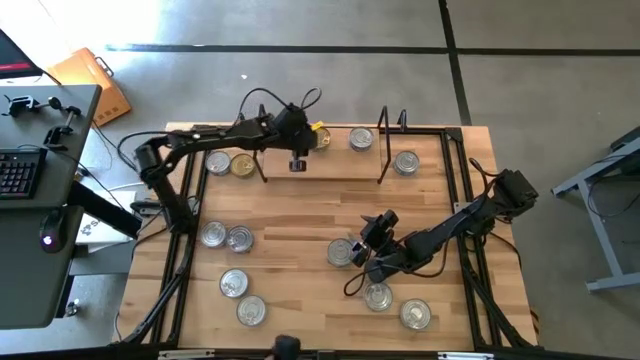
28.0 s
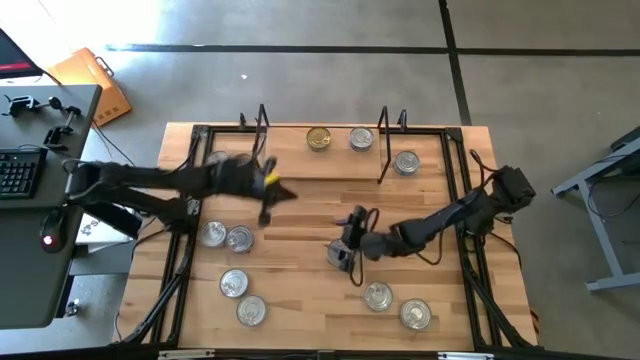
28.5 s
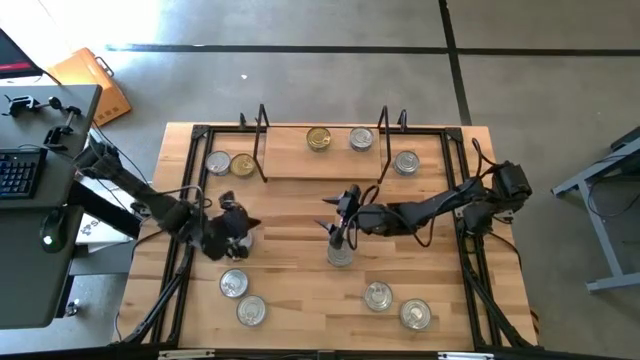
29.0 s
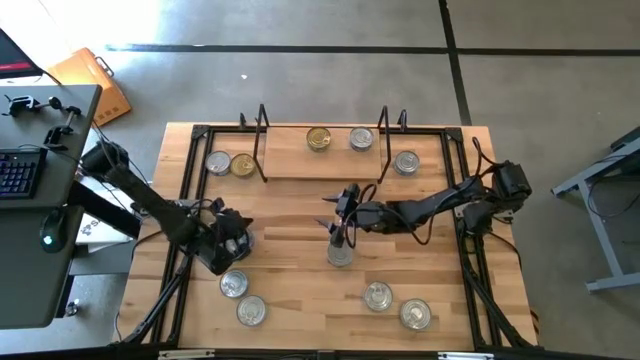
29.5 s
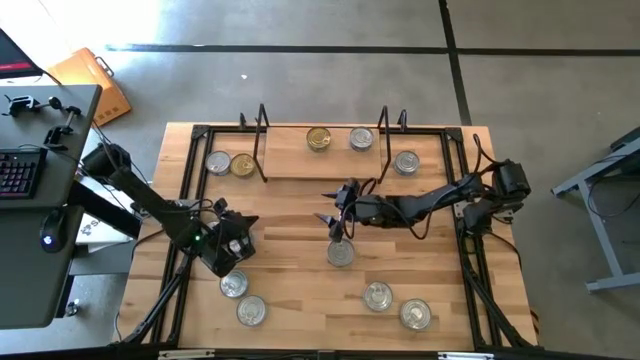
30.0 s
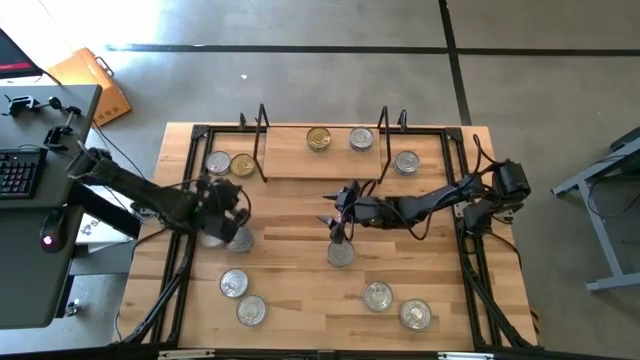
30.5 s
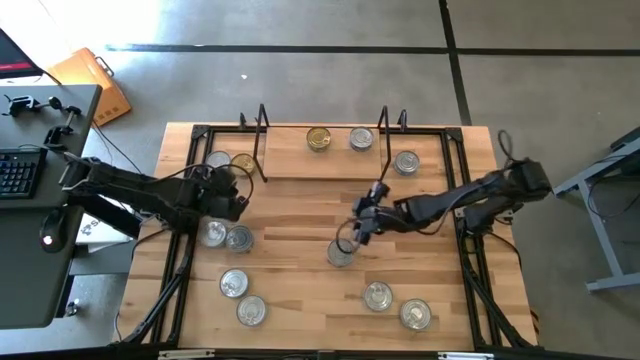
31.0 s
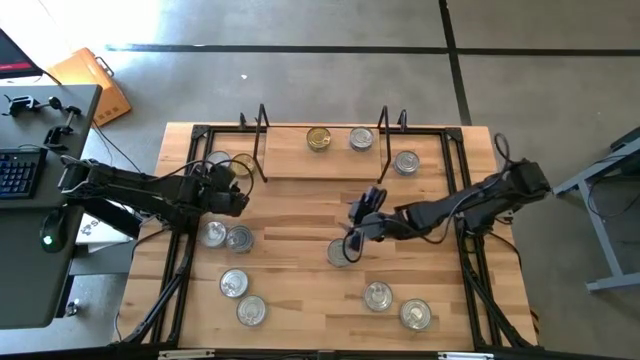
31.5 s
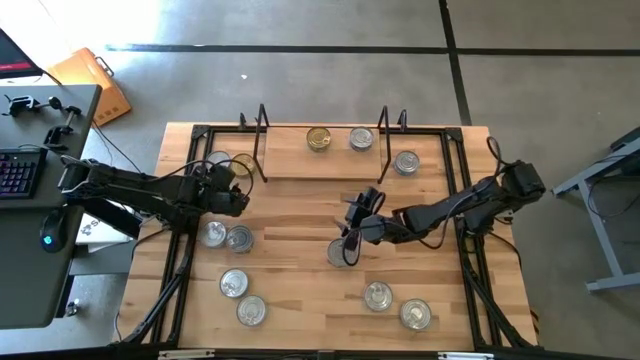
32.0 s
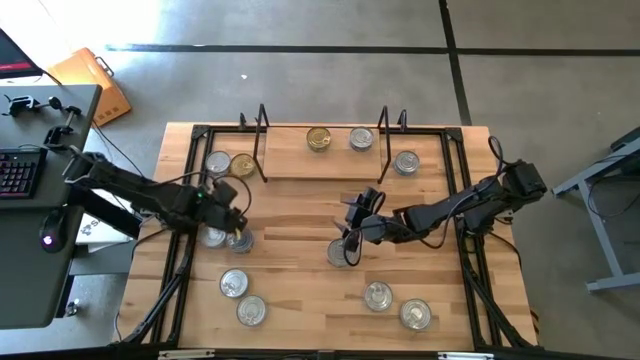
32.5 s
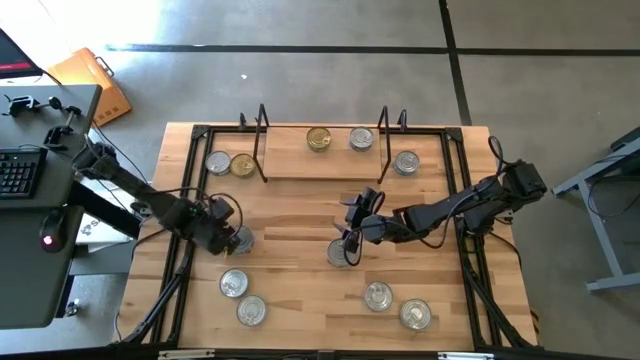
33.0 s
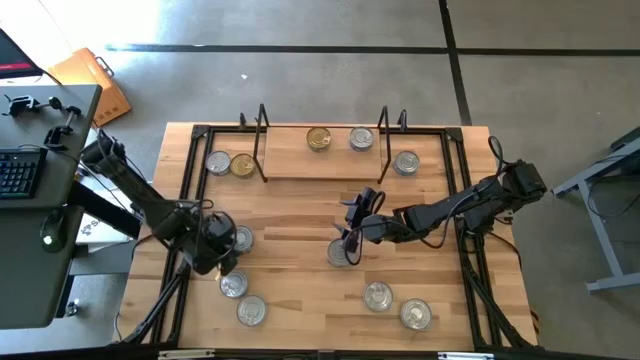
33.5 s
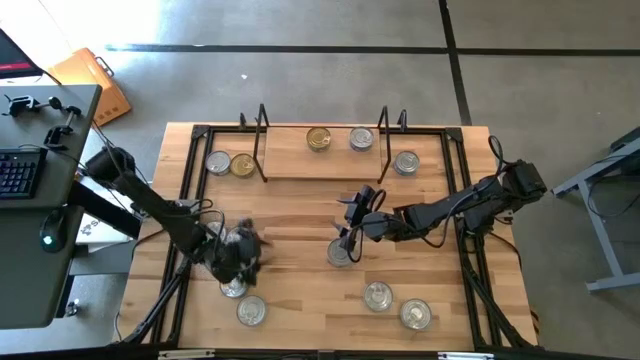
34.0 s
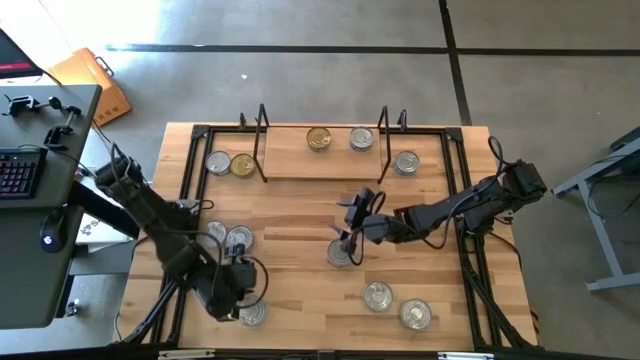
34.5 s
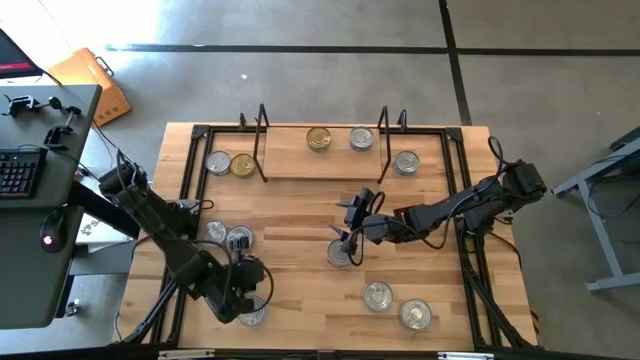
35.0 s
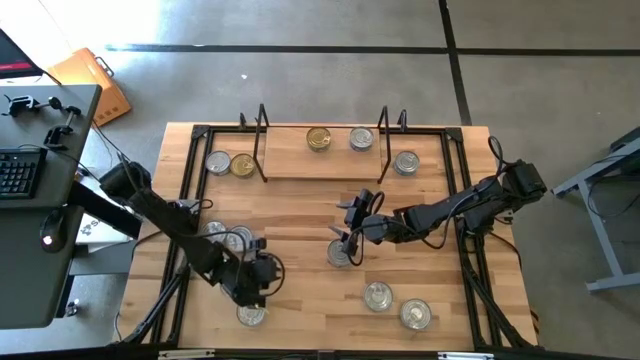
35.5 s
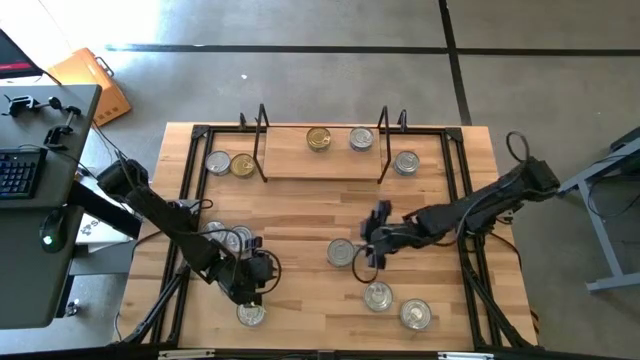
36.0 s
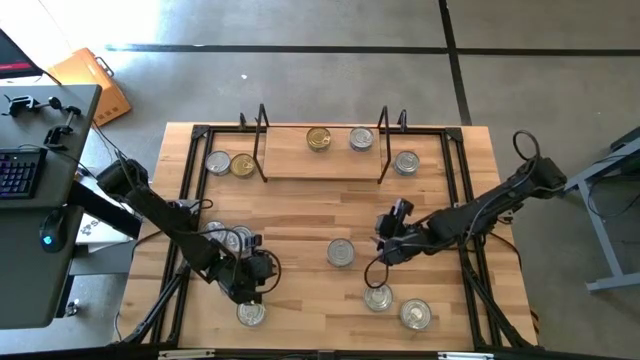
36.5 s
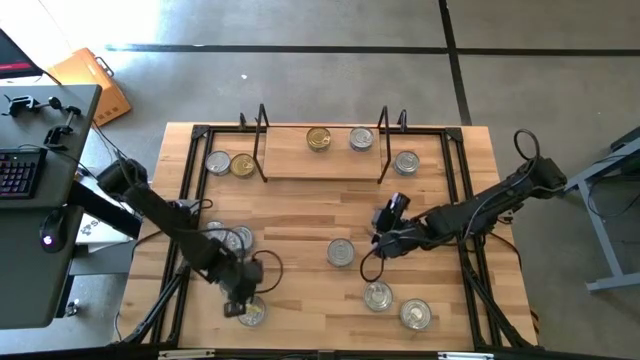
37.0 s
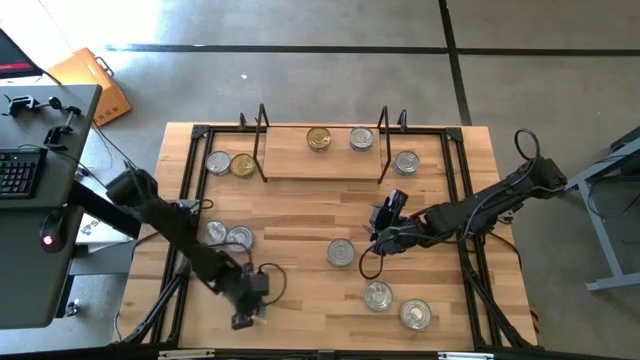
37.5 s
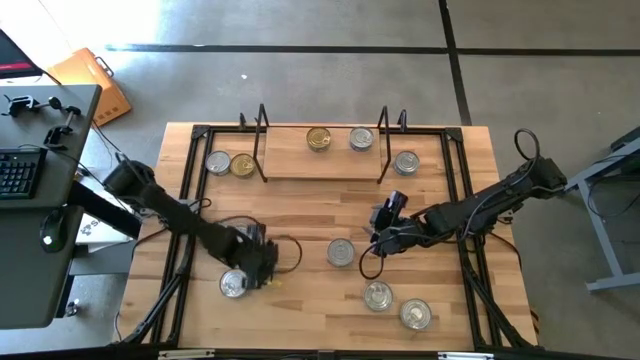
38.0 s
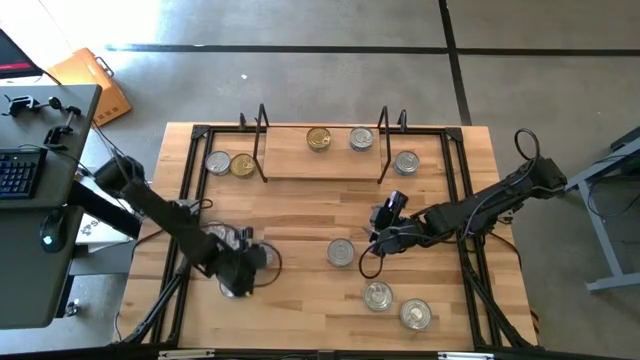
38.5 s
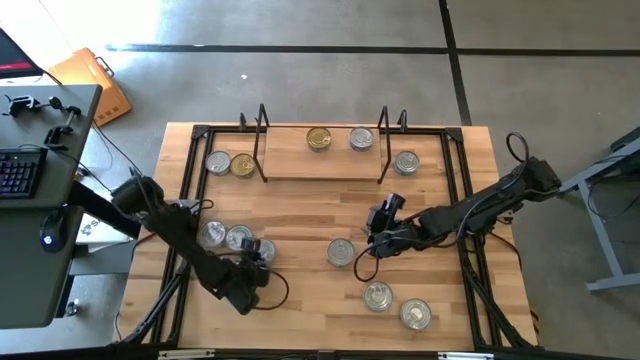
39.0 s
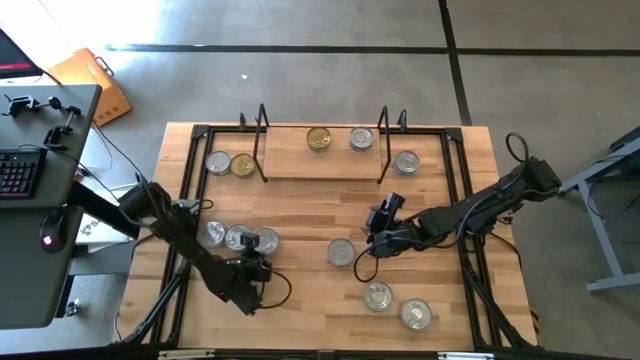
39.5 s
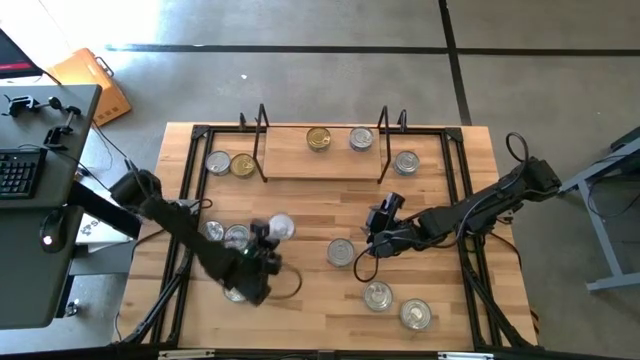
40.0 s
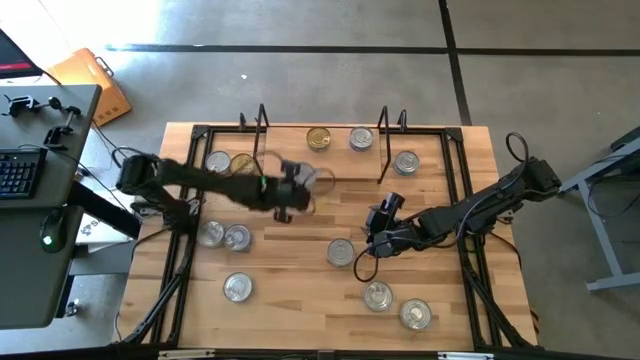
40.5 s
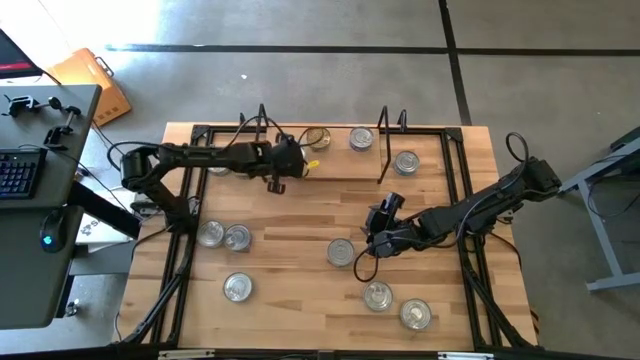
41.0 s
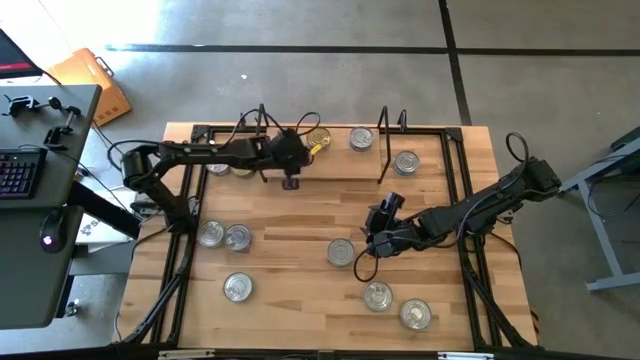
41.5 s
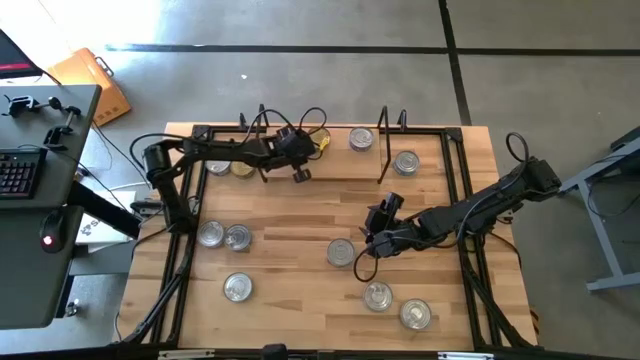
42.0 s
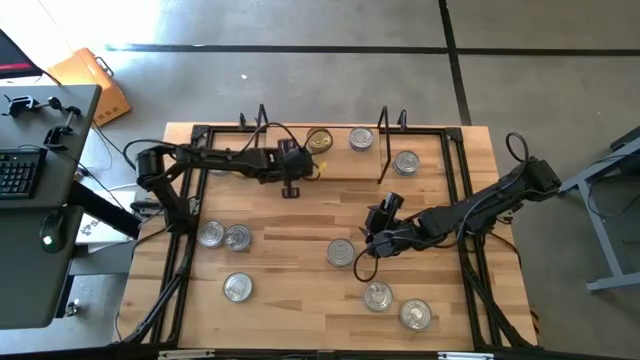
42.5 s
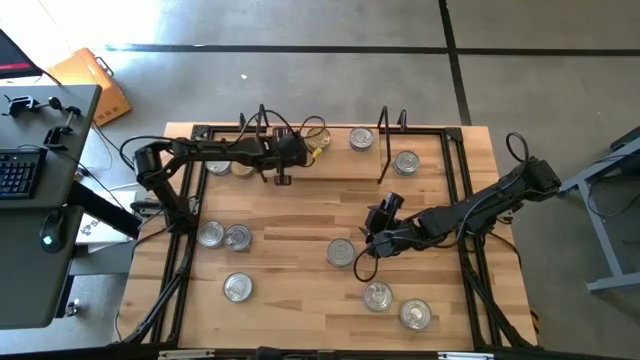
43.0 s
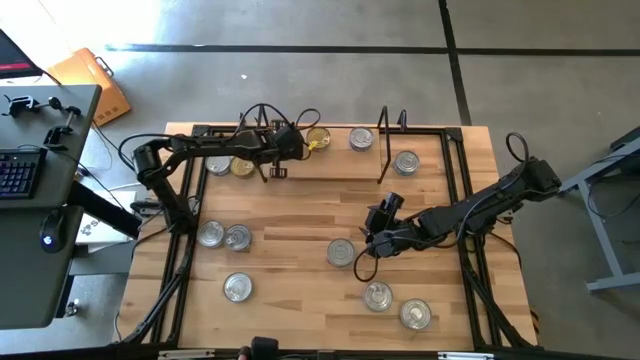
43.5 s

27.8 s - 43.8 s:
Task: Stack canned seafood by type on shelf
Put the yellow-blue tuna can on the shelf

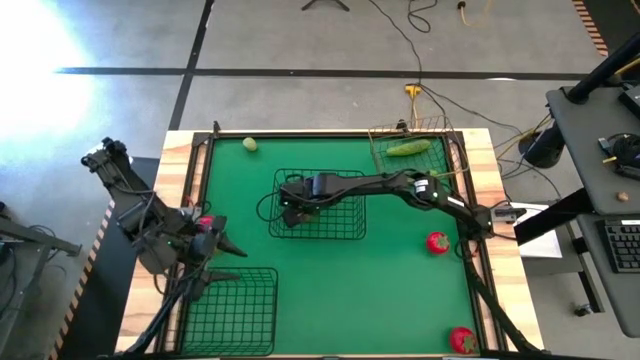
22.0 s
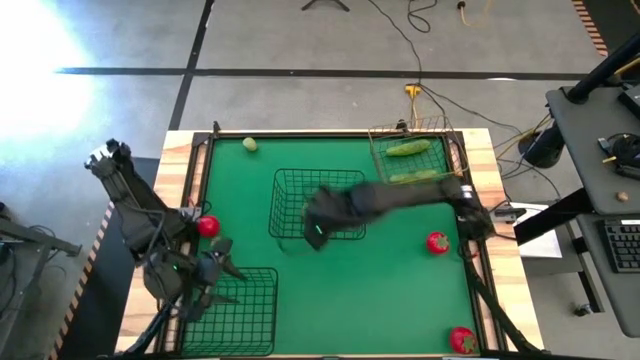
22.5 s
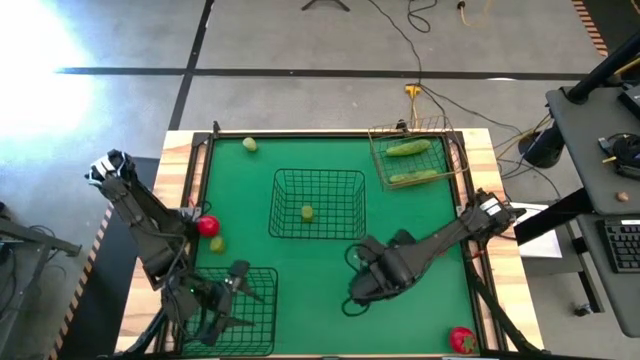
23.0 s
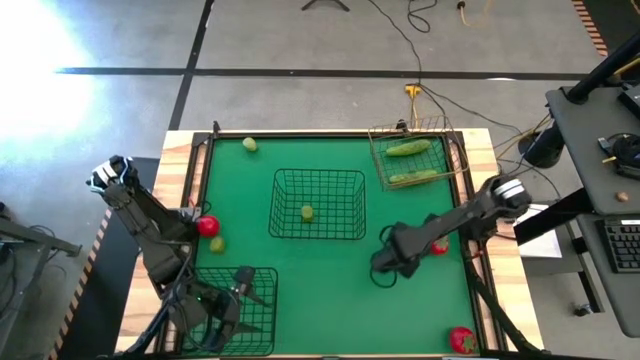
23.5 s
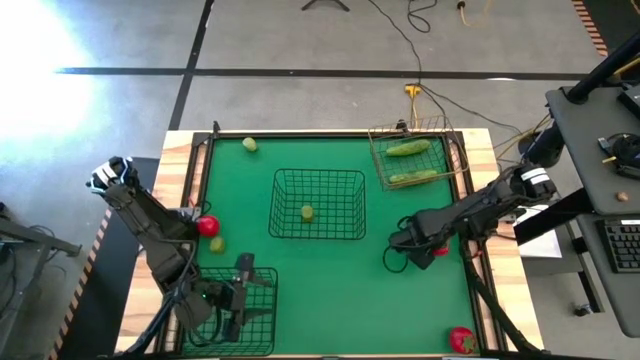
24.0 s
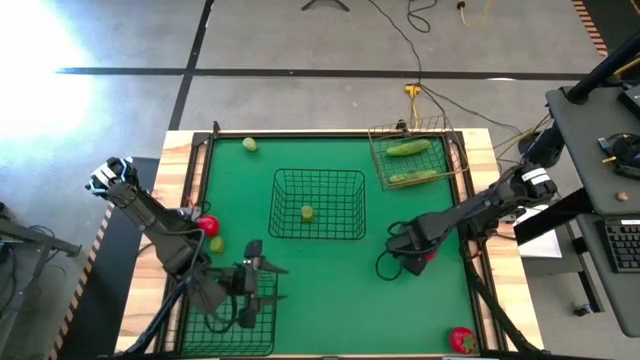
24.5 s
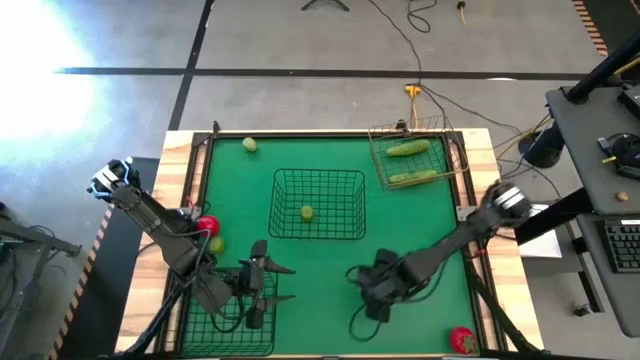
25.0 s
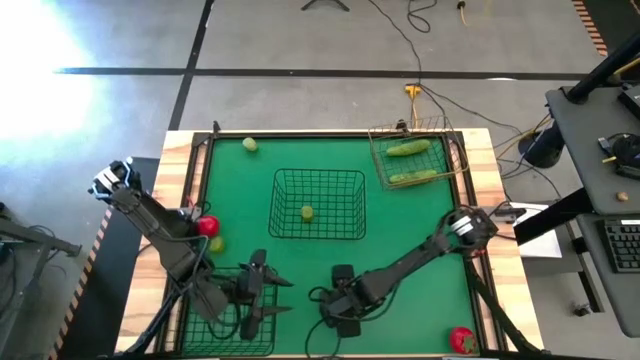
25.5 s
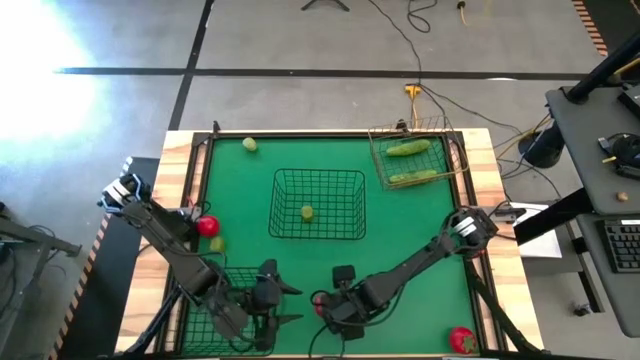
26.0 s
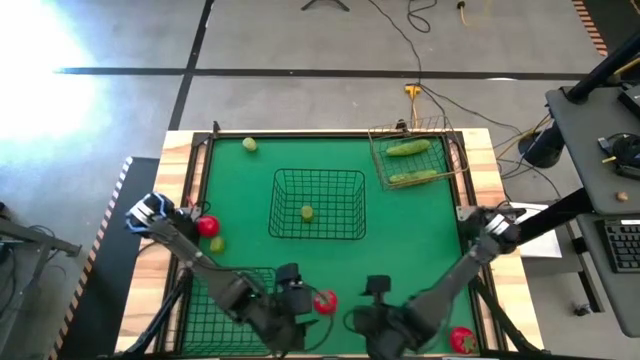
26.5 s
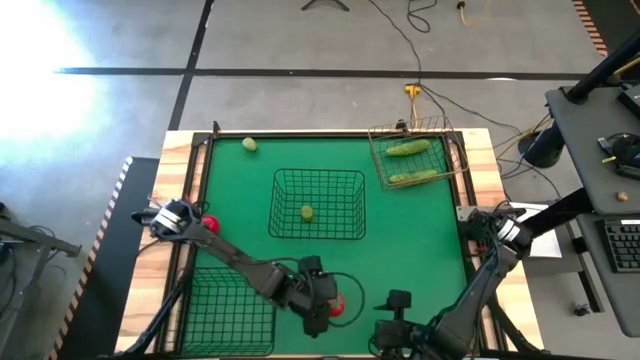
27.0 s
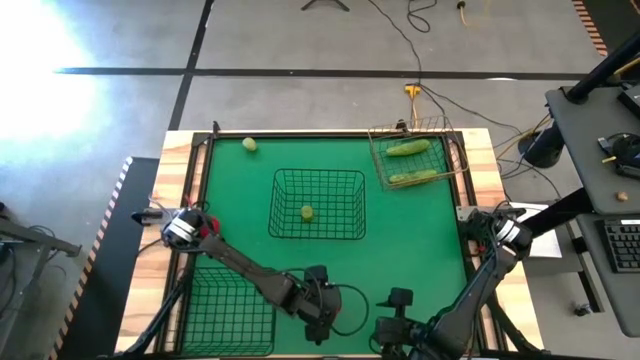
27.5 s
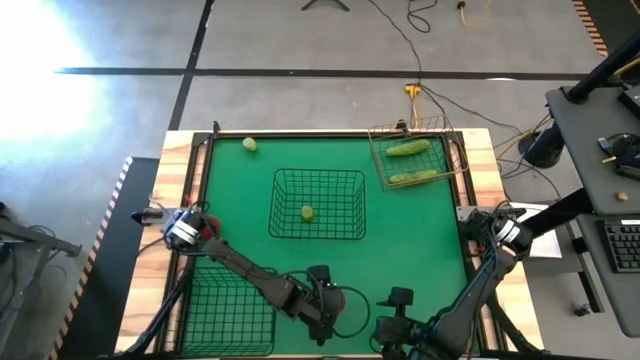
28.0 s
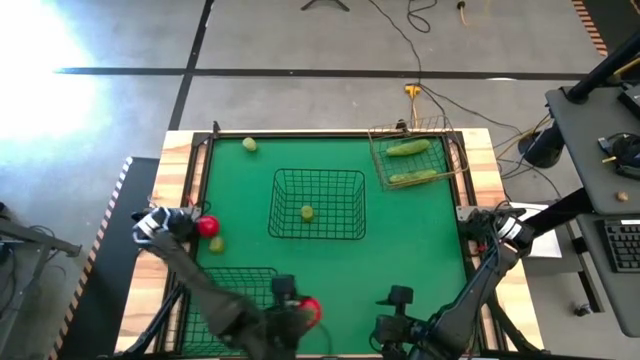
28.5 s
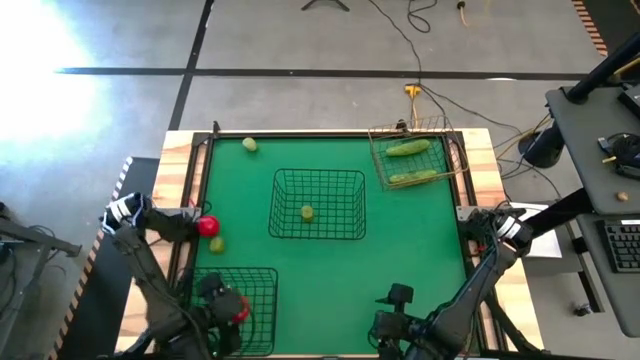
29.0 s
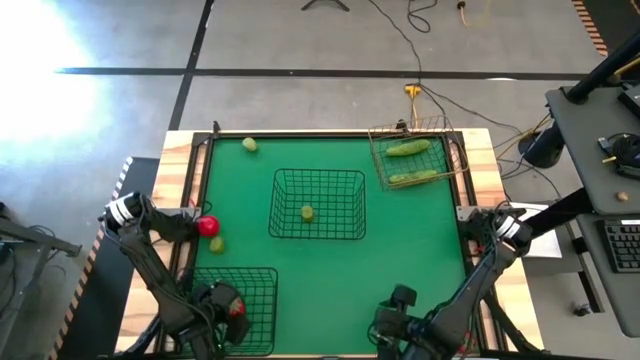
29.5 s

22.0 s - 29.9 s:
Task: Sort produce into baskets
Put the top right red tomato into the bottom black wire basket
